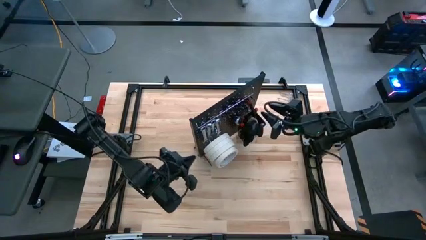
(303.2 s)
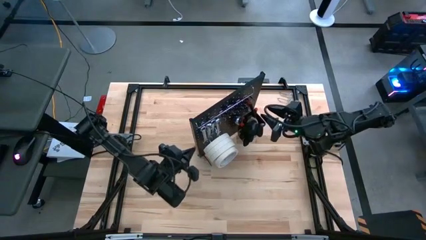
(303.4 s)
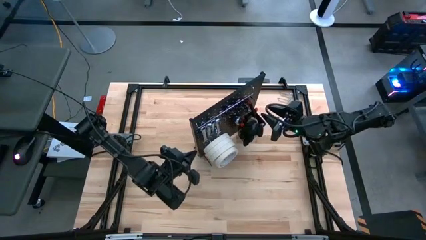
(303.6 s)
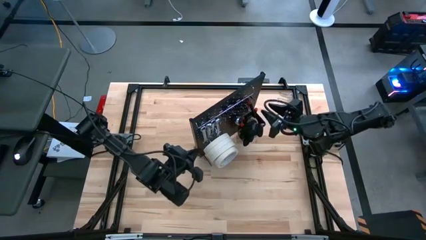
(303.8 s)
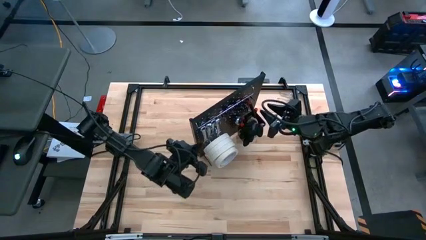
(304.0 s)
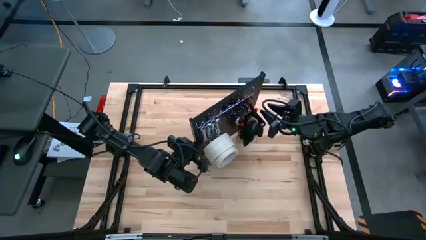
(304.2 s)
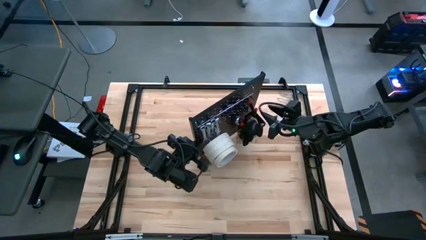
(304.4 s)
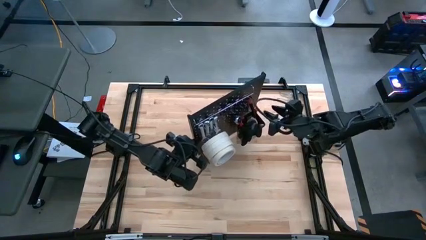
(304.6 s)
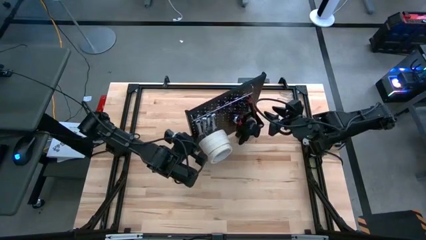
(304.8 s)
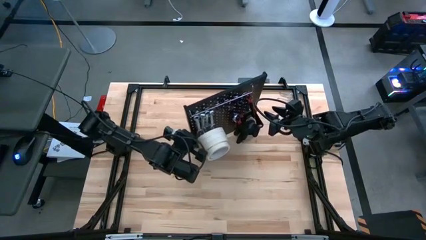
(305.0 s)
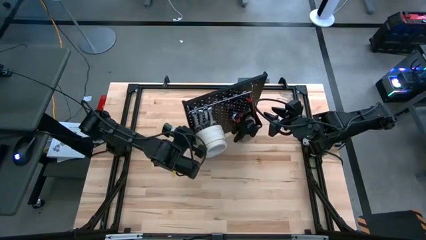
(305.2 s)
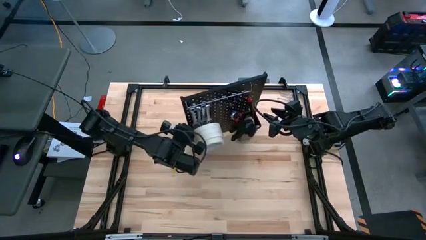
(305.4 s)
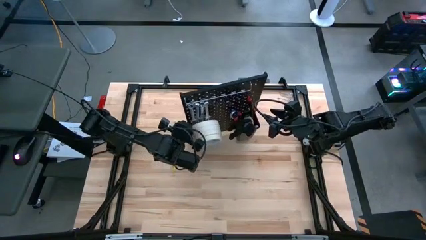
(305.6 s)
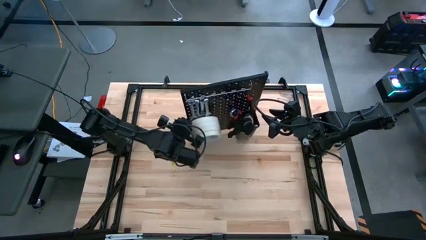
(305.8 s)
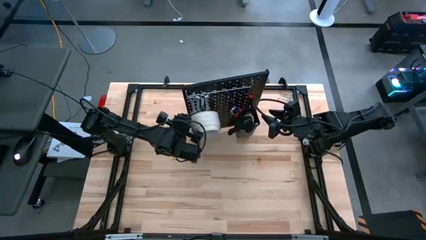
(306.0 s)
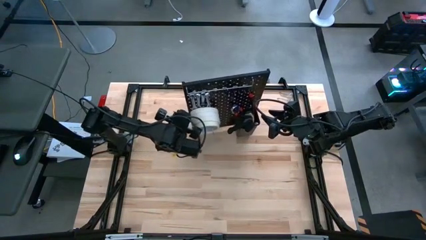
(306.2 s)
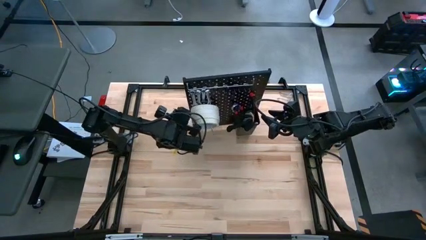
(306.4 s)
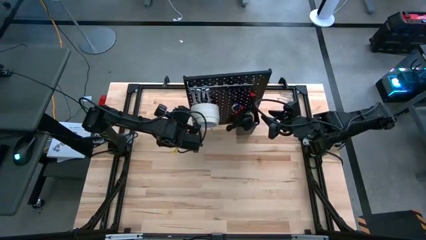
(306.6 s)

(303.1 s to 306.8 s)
Task: Hang tools onto peg board
Move the pegboard to the upper middle

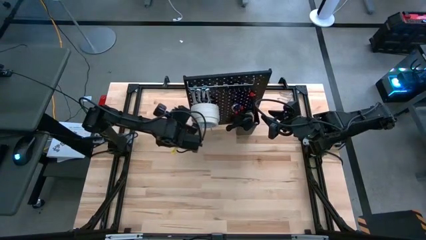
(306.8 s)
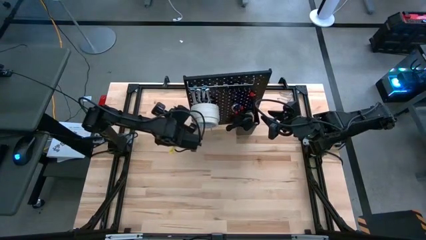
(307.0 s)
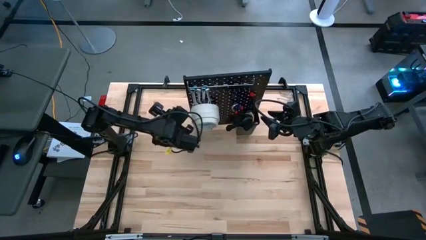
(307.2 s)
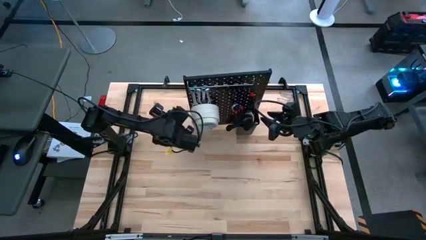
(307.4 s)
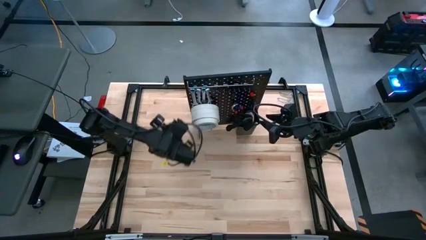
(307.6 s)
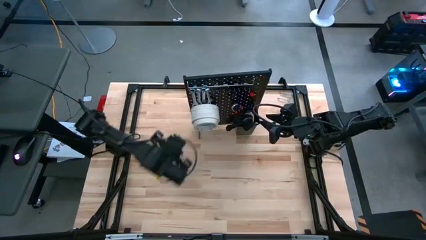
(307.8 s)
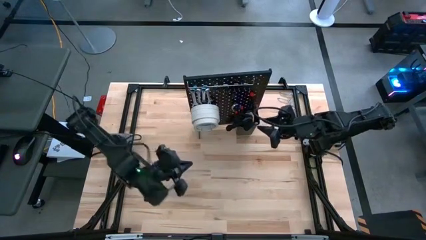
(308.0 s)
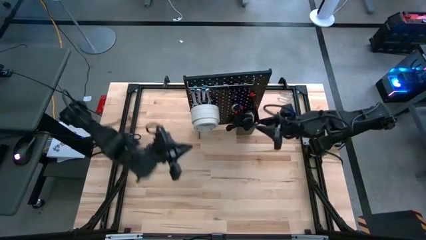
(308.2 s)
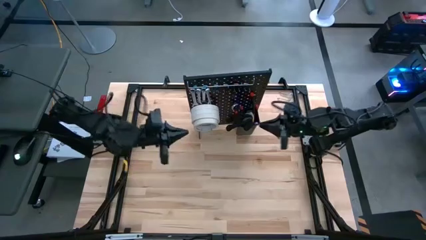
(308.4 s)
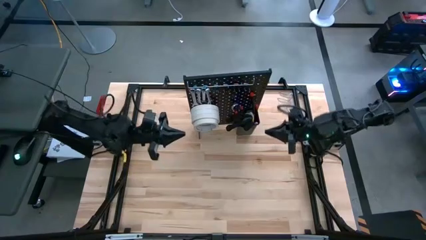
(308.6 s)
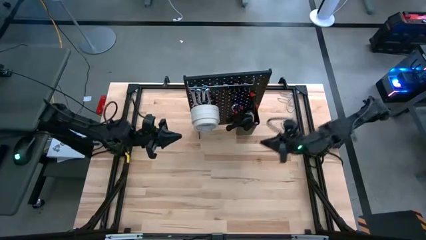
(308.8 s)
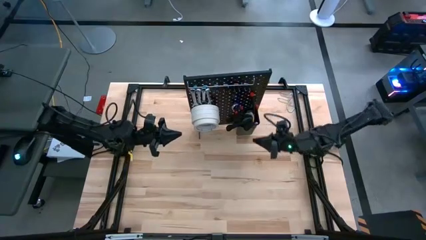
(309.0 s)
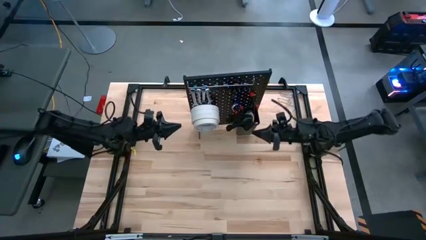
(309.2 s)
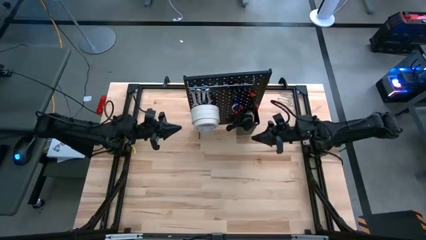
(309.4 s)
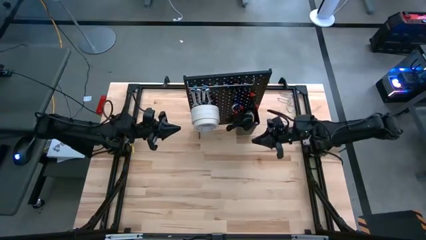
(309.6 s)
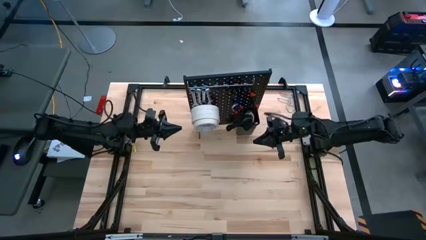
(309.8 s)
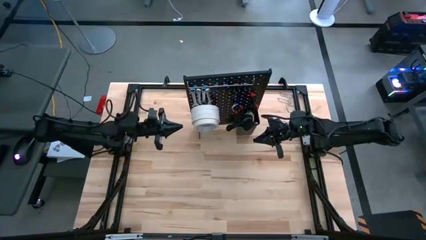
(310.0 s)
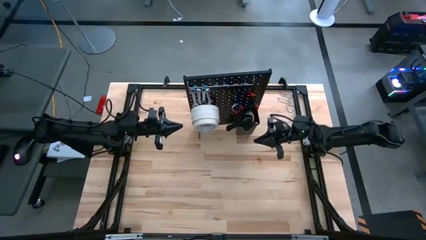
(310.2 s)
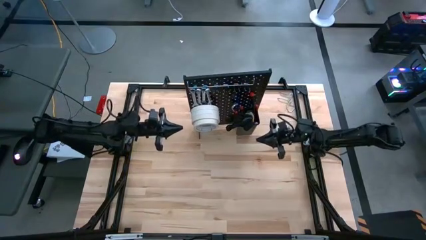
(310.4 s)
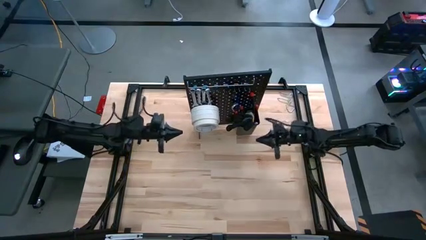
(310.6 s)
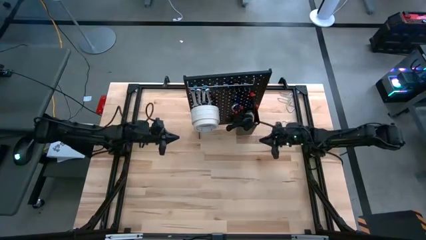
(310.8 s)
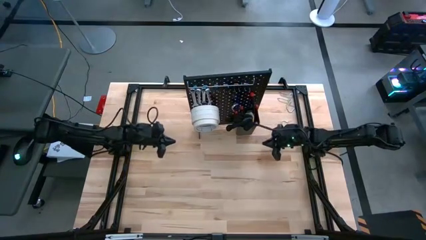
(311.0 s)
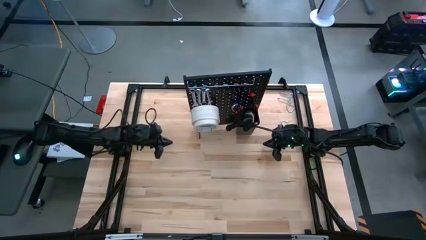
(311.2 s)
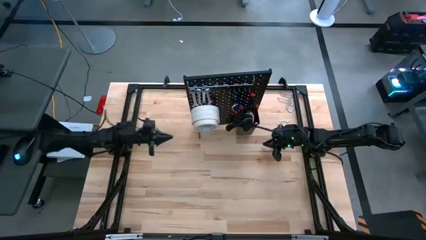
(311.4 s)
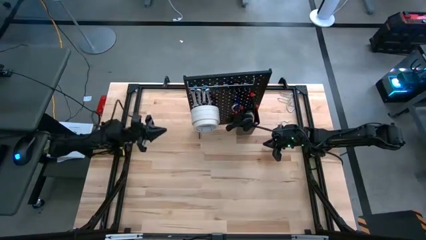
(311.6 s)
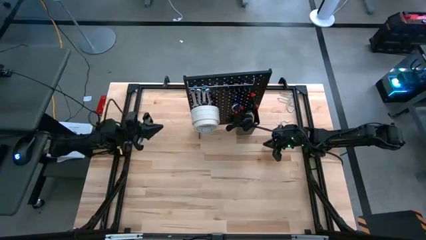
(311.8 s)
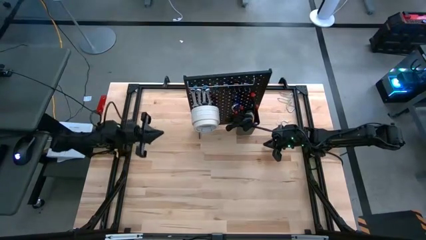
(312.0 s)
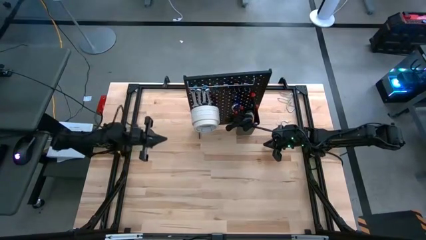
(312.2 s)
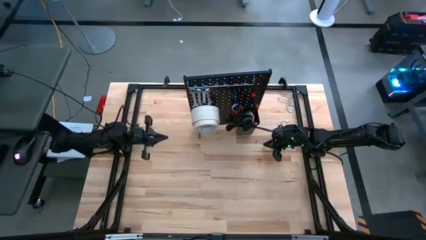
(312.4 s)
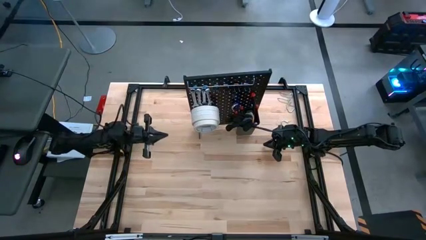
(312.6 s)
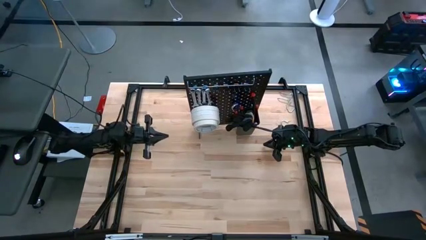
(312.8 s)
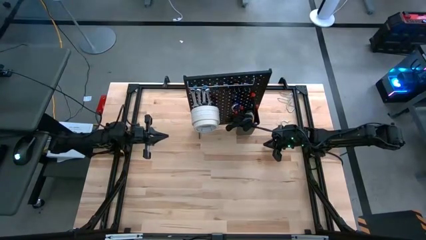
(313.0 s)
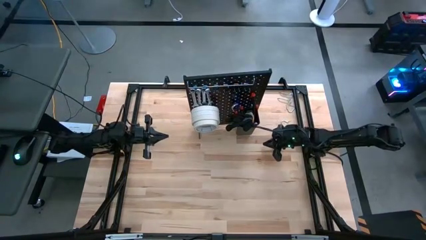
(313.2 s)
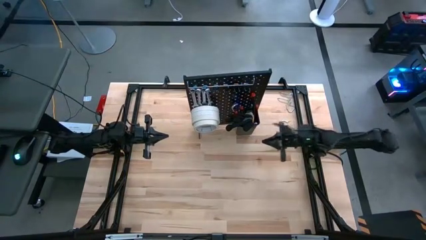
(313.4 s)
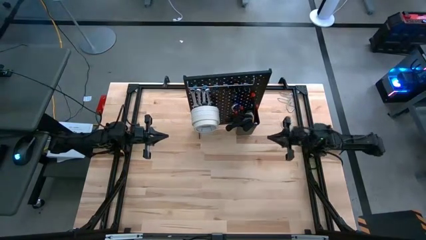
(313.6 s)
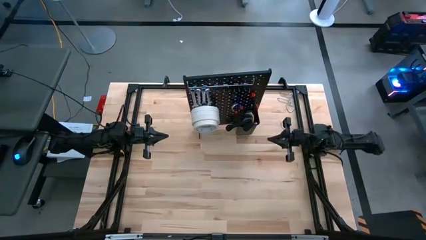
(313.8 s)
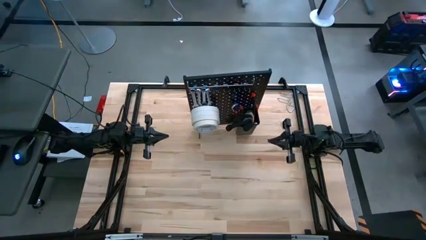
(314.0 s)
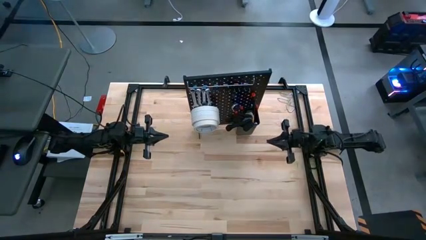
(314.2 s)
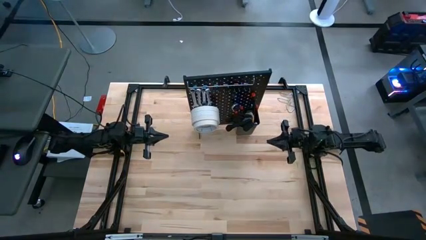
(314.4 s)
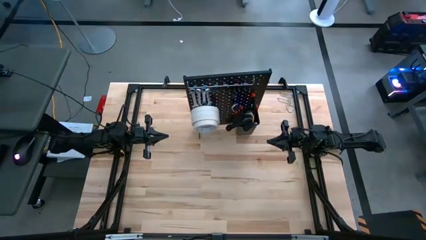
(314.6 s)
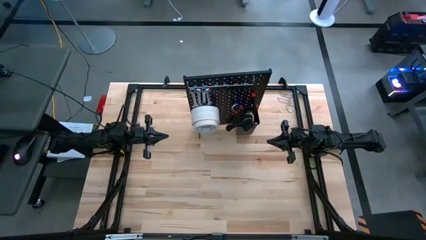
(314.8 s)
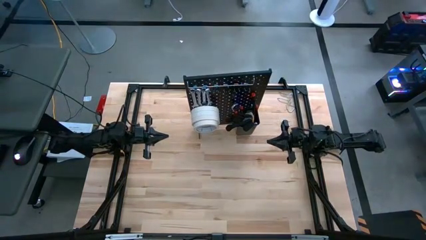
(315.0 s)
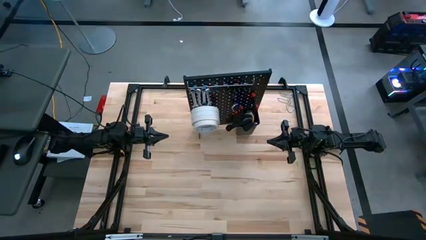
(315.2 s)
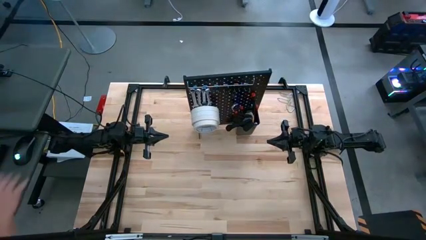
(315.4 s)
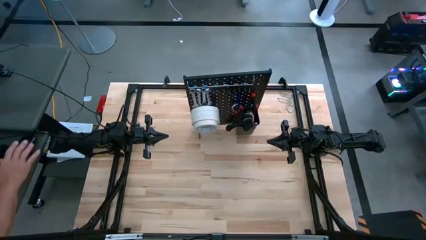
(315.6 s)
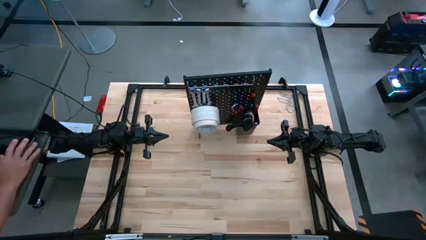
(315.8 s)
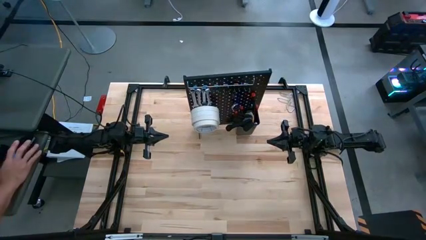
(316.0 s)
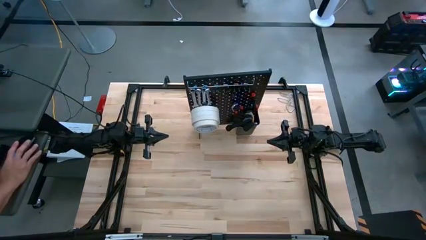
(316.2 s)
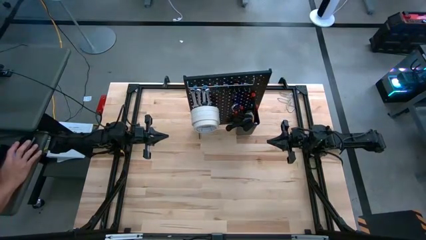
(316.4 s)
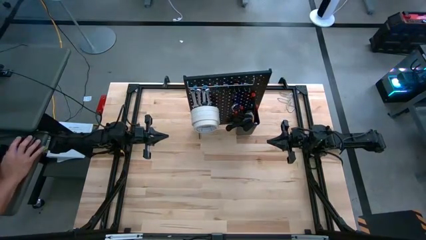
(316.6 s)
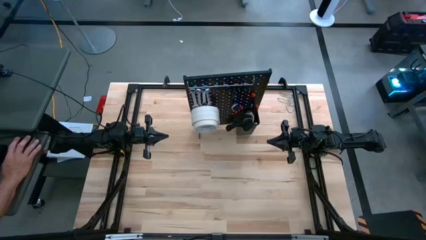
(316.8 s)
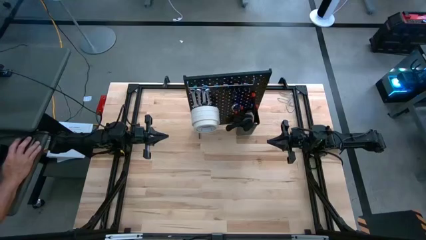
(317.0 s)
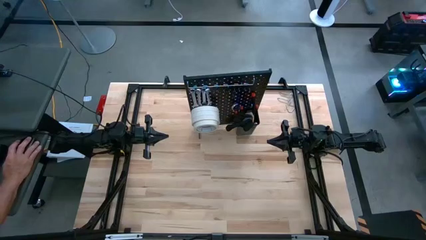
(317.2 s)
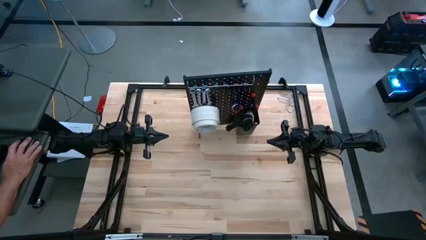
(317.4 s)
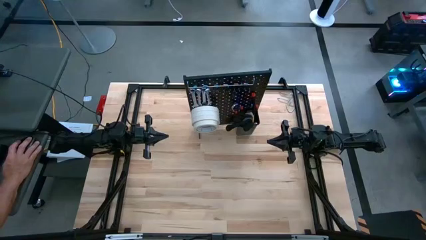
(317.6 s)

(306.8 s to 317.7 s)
Return to Home Position
